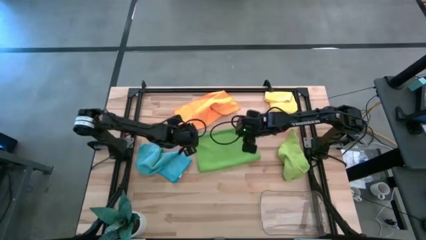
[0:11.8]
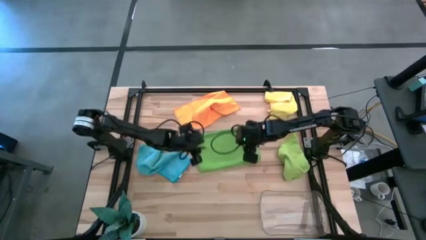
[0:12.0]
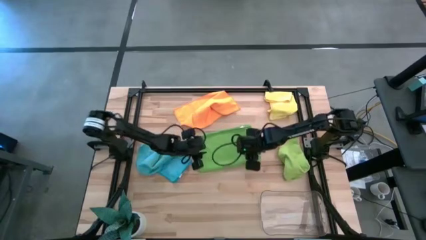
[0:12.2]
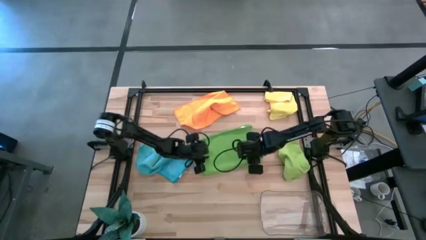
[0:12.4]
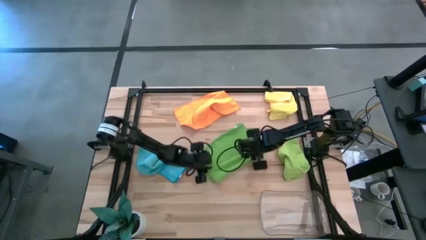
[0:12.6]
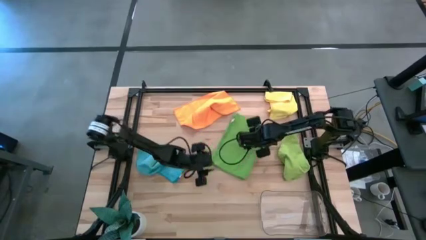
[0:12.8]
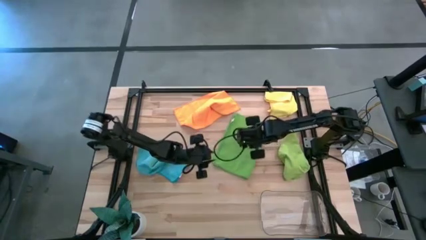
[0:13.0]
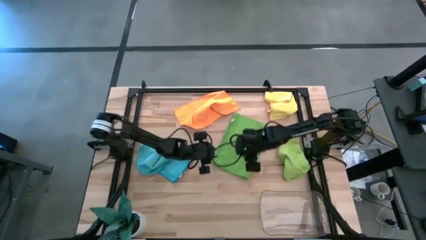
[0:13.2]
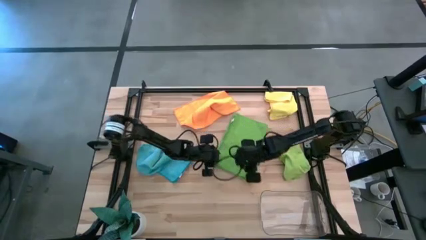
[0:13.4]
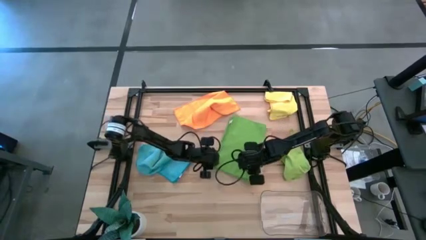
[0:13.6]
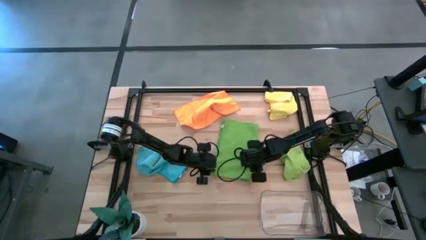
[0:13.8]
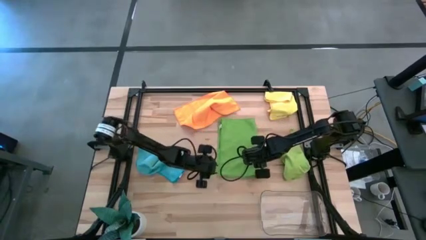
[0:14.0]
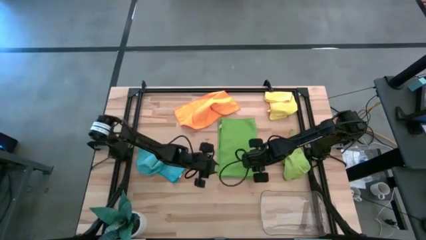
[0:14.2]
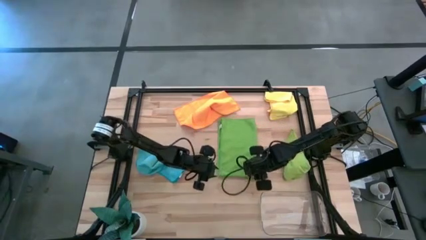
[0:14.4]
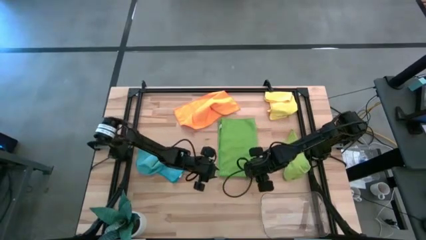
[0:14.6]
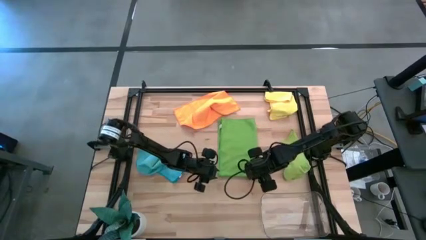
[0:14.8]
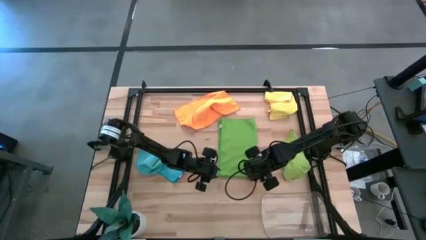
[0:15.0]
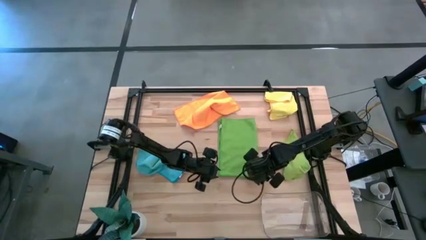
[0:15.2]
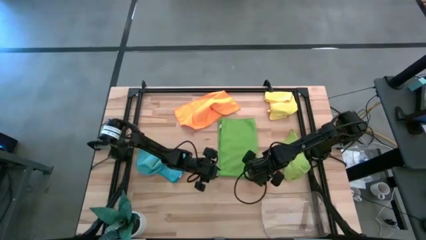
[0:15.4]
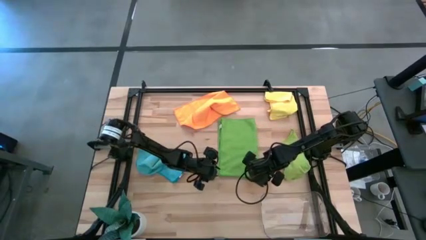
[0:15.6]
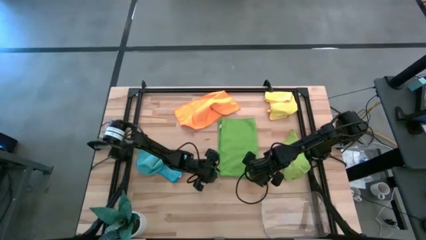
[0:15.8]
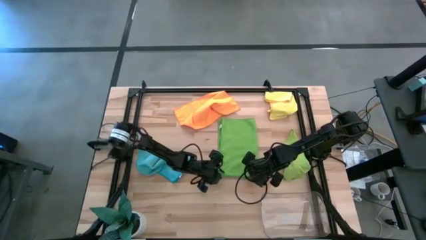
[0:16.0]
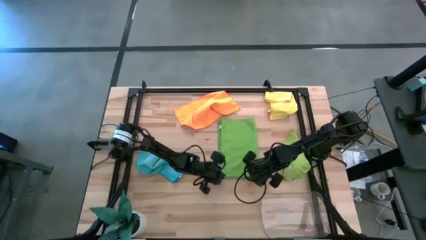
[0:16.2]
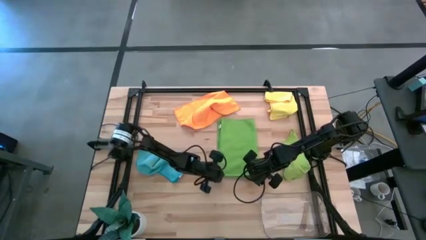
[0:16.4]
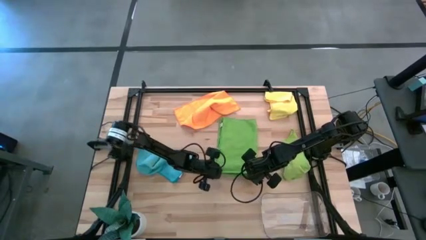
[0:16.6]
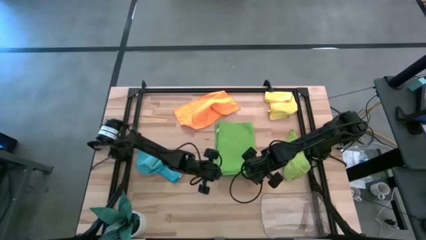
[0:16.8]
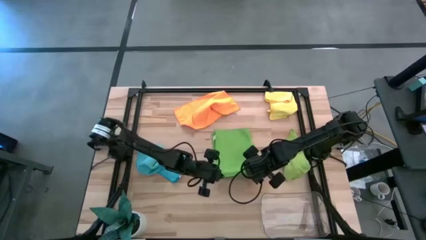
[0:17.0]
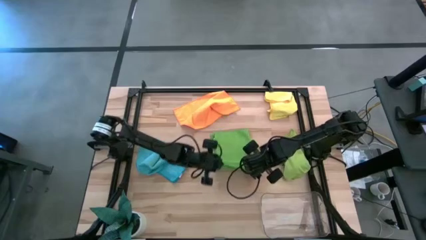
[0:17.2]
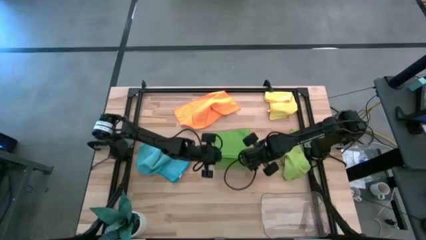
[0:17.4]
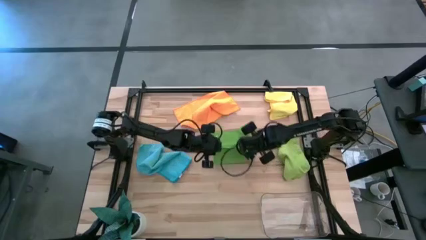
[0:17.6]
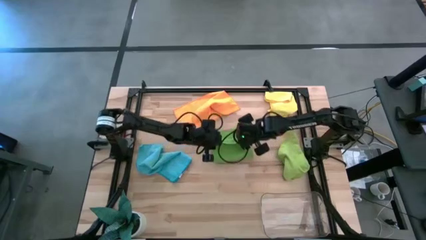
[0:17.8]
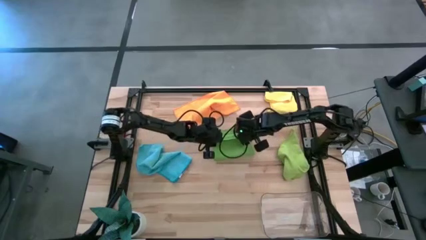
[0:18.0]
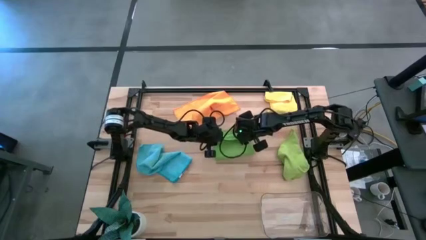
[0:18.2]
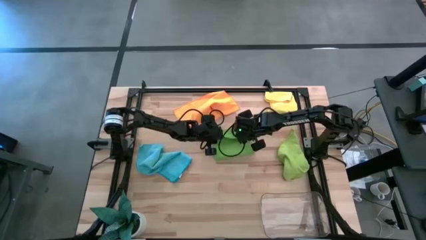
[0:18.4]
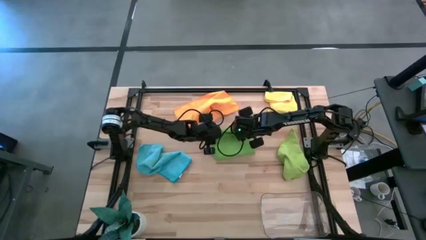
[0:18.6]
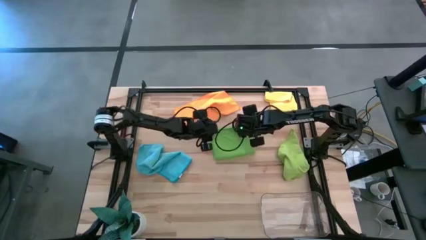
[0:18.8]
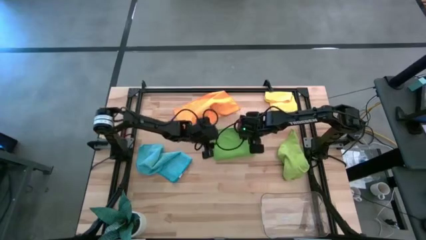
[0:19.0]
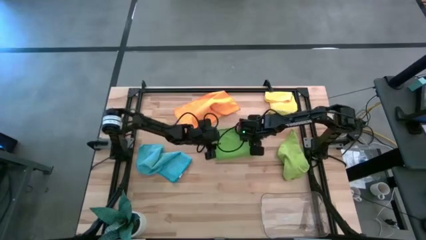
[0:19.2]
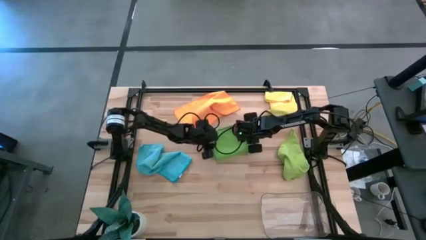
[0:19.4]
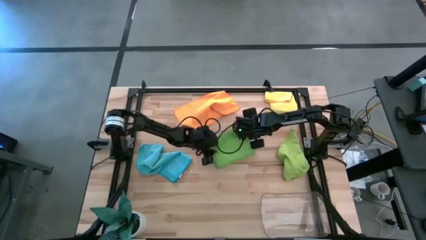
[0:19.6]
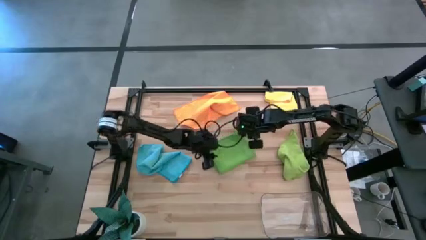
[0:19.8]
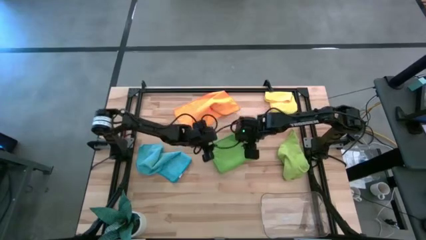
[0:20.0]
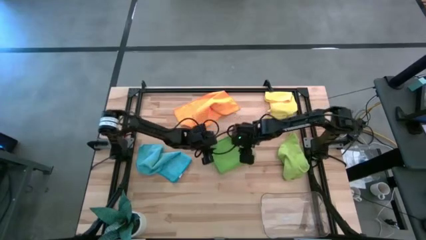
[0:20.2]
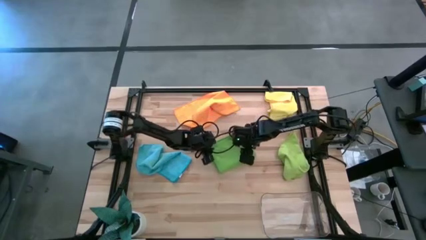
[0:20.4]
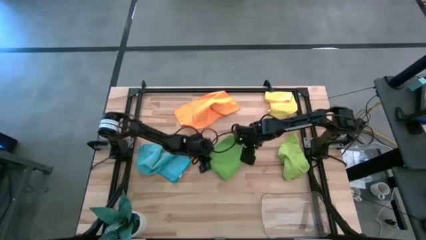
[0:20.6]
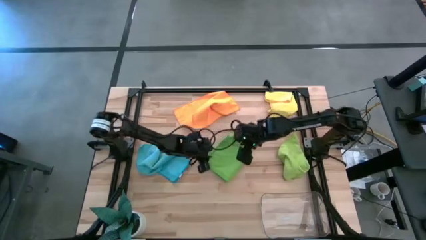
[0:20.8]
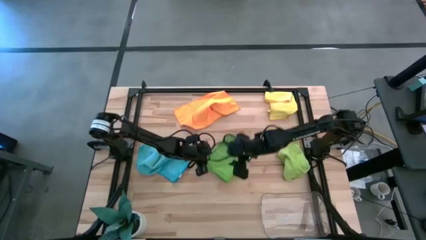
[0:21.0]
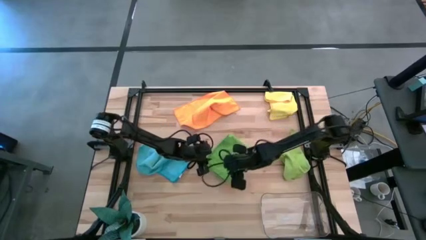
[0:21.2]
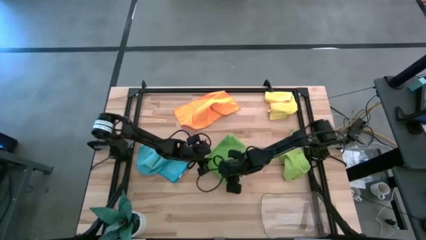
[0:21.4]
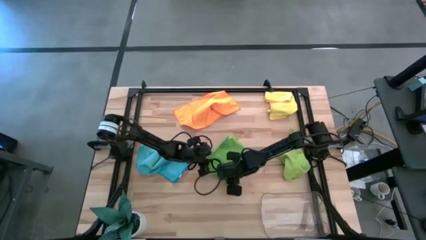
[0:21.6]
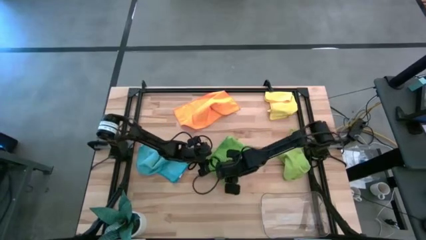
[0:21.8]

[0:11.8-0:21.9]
Task: Fold microfiber towels
Fold the green microfiber towel

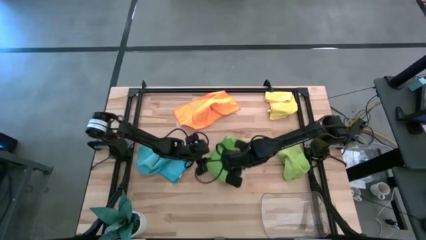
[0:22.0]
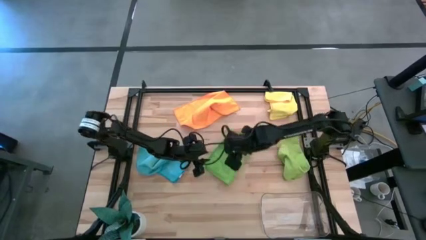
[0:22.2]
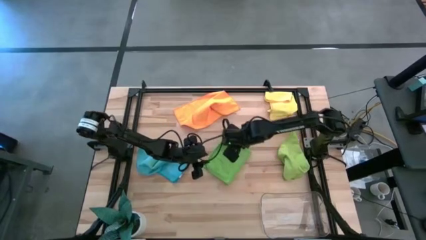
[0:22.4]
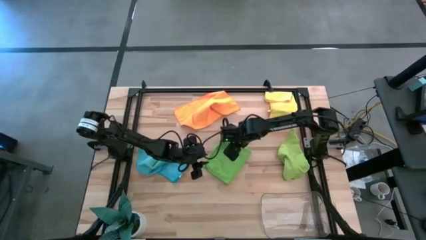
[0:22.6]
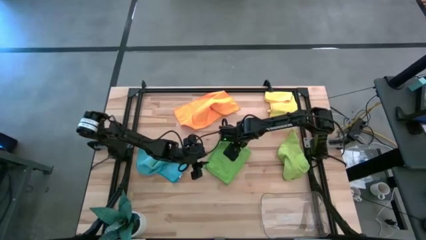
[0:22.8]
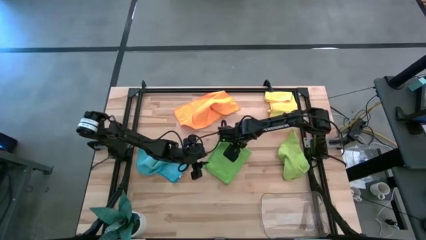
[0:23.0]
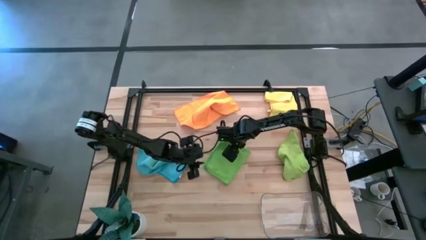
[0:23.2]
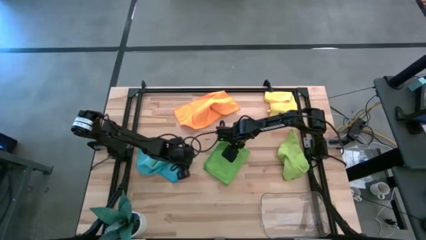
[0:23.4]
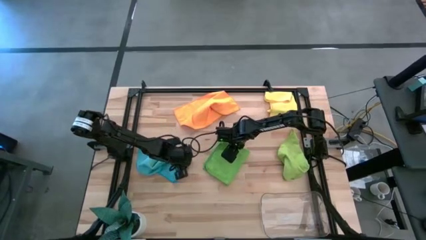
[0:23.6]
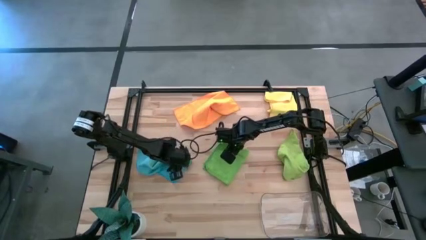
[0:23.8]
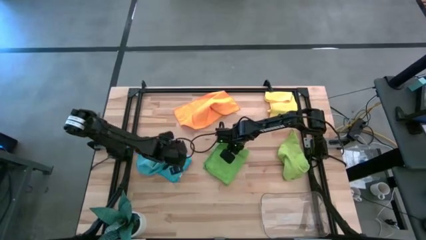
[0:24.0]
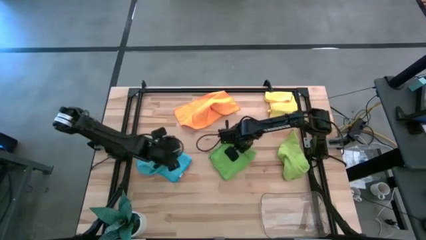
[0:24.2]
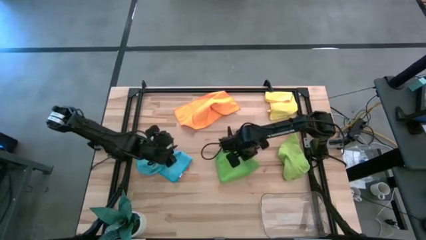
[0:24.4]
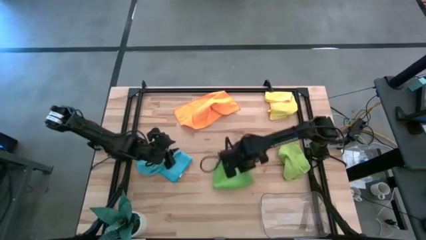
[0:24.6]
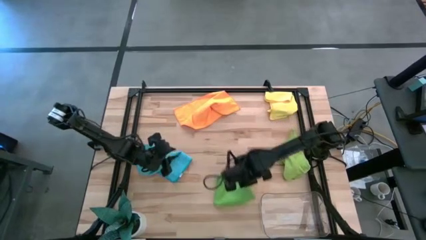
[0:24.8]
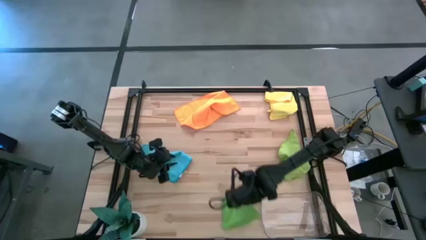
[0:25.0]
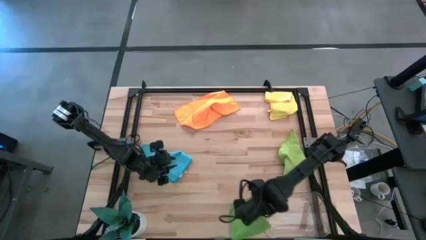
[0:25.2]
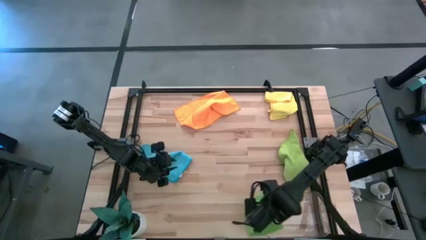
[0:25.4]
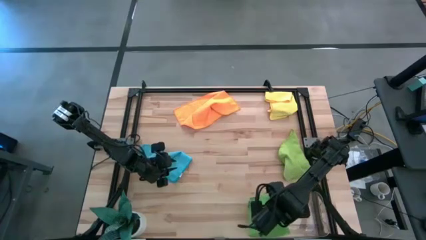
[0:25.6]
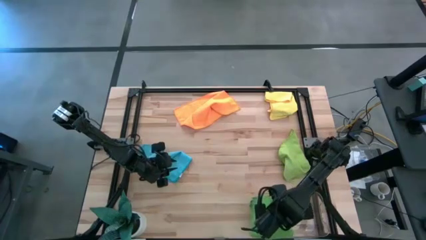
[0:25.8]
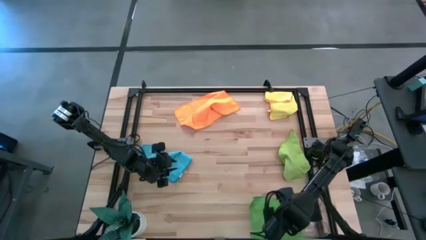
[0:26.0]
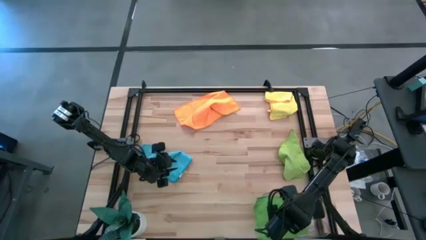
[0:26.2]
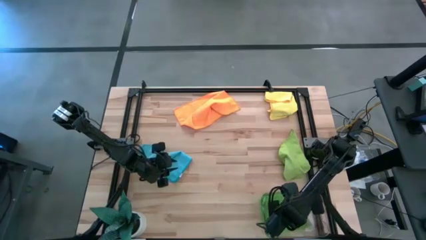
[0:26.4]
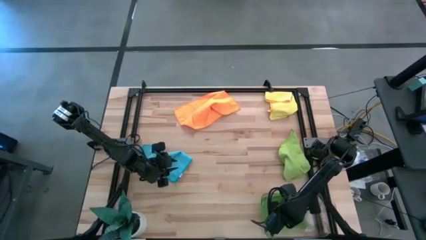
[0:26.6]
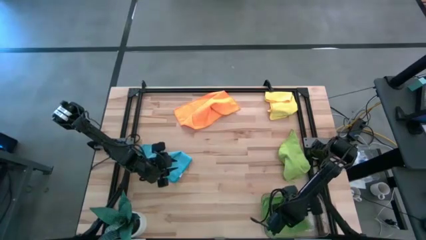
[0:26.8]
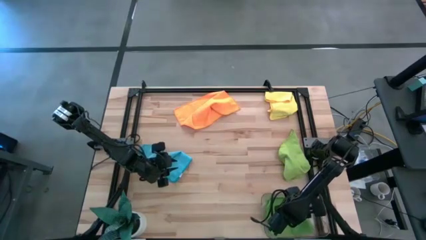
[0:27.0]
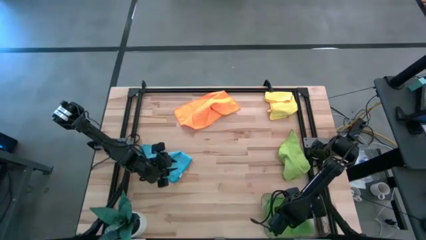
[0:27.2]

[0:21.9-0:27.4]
Put the green towel into the transparent bin
